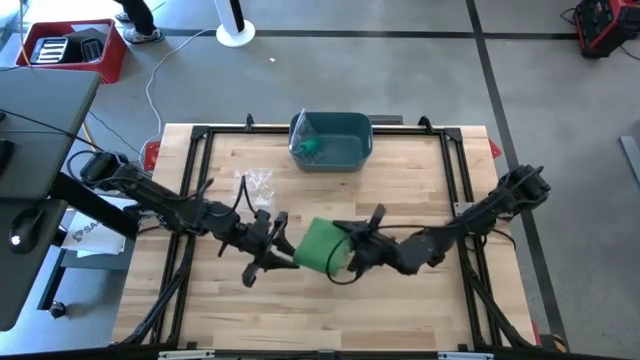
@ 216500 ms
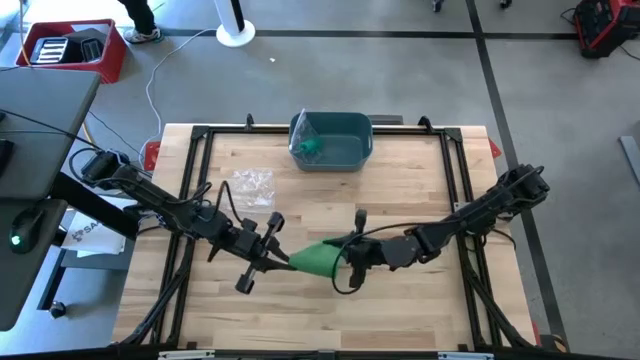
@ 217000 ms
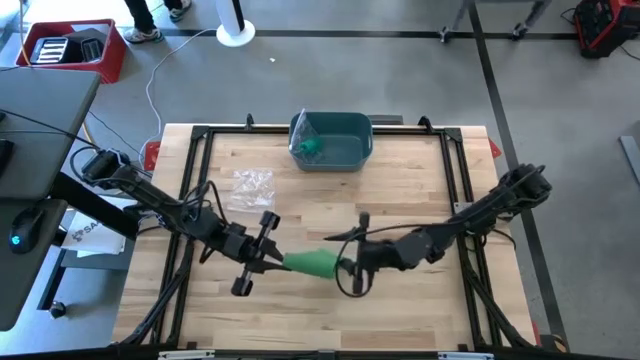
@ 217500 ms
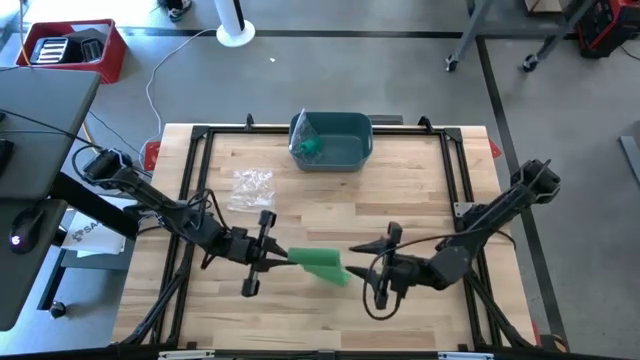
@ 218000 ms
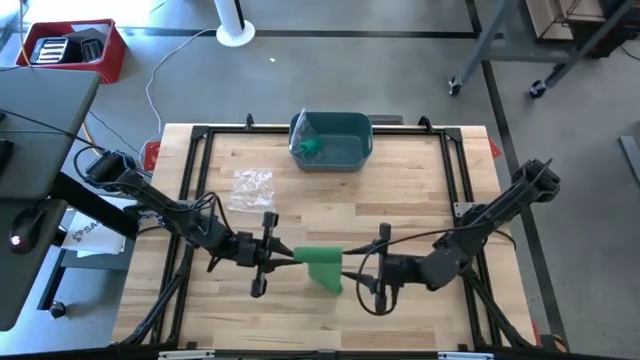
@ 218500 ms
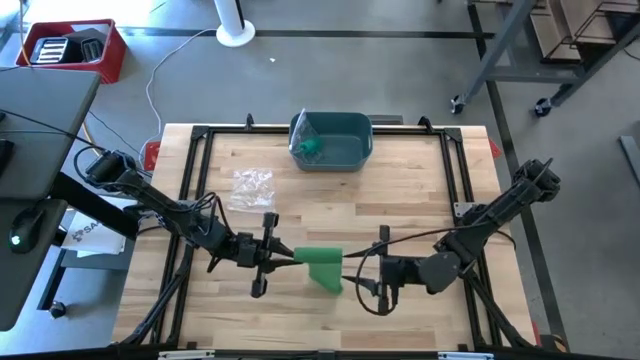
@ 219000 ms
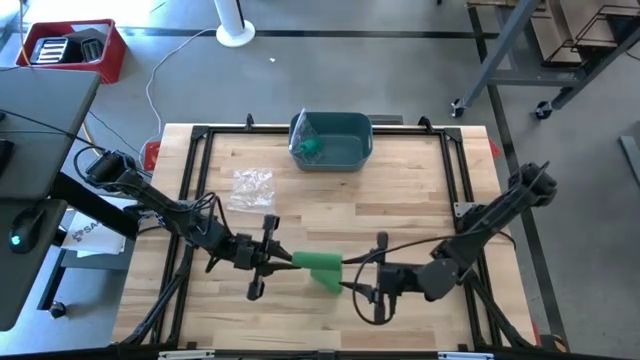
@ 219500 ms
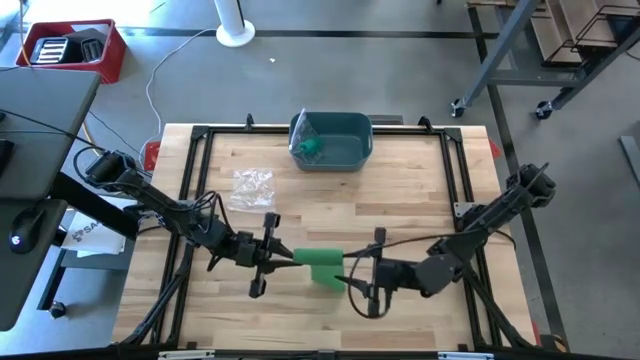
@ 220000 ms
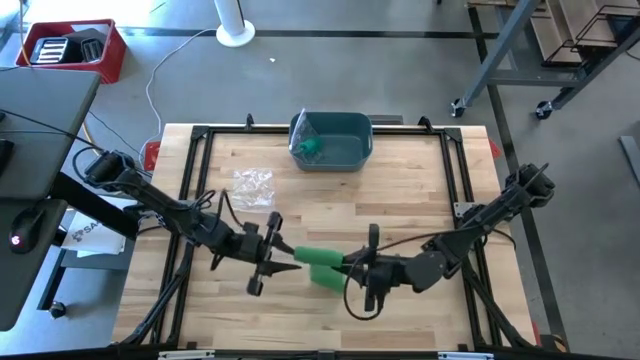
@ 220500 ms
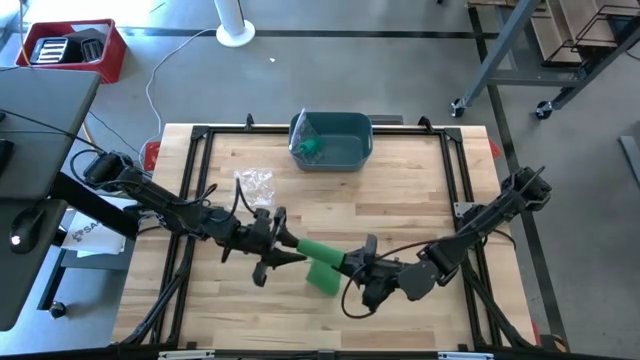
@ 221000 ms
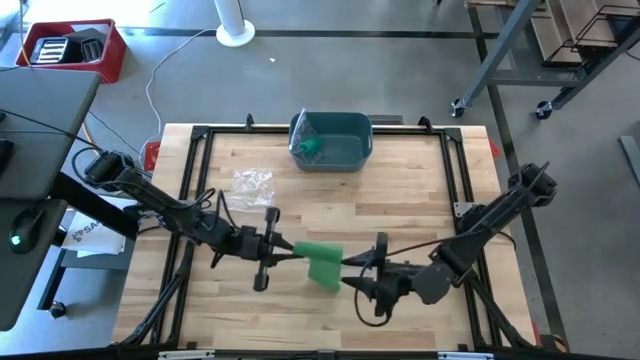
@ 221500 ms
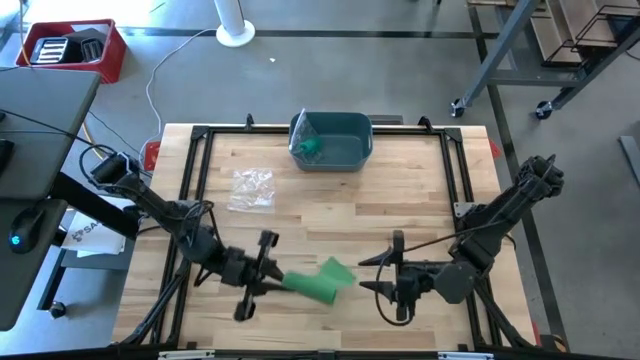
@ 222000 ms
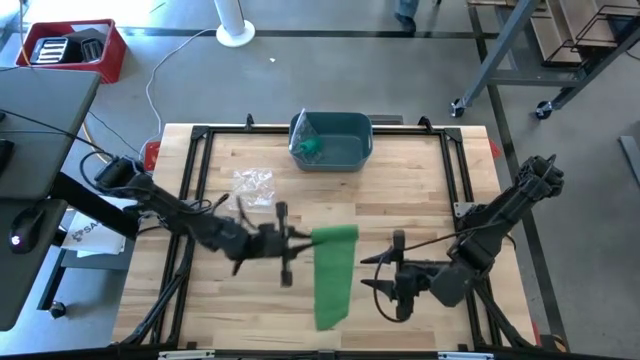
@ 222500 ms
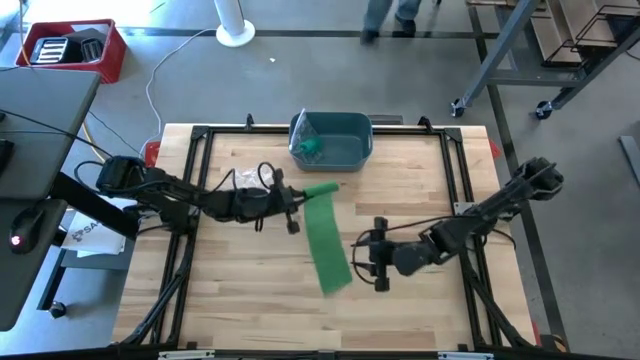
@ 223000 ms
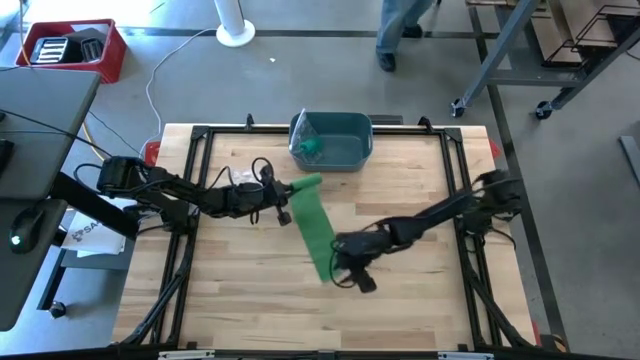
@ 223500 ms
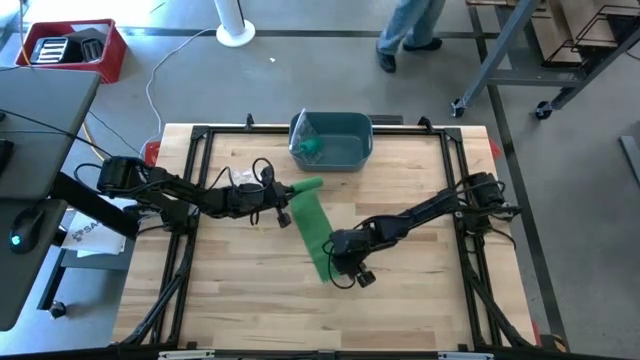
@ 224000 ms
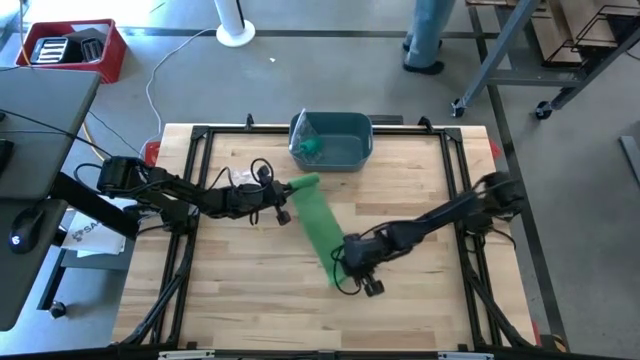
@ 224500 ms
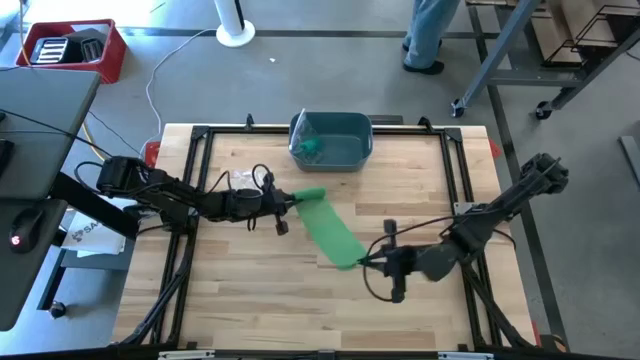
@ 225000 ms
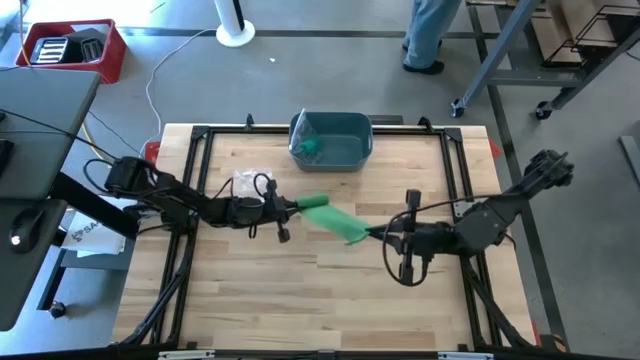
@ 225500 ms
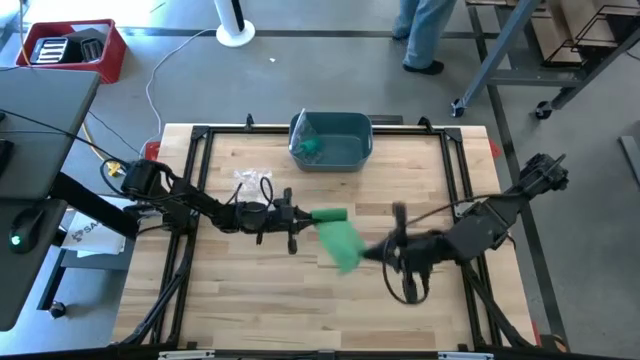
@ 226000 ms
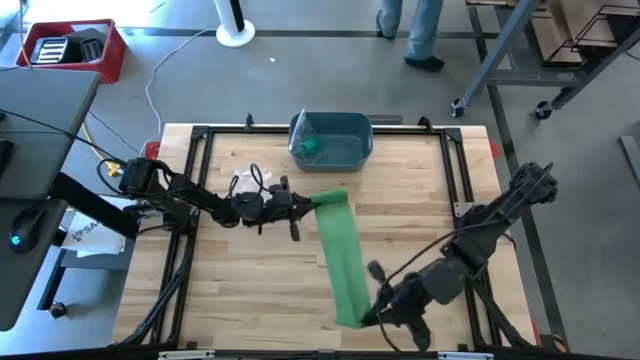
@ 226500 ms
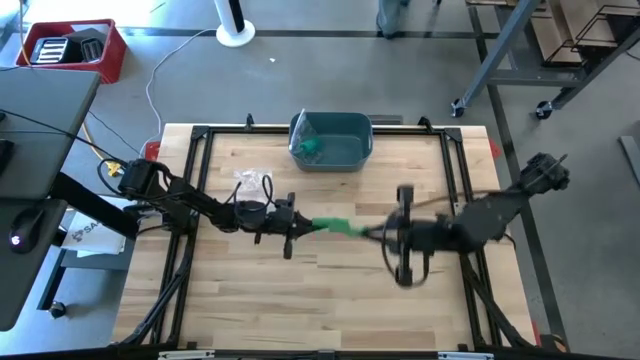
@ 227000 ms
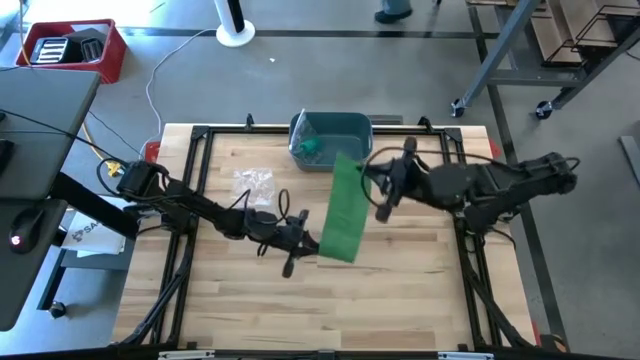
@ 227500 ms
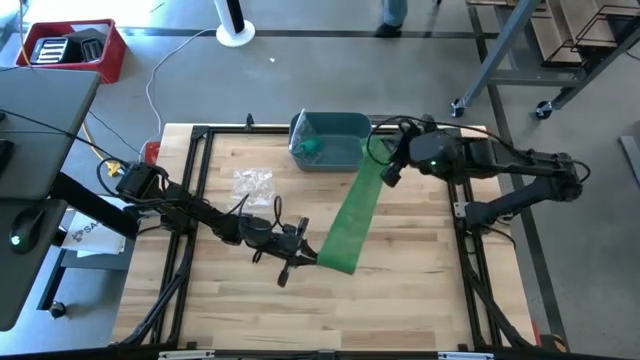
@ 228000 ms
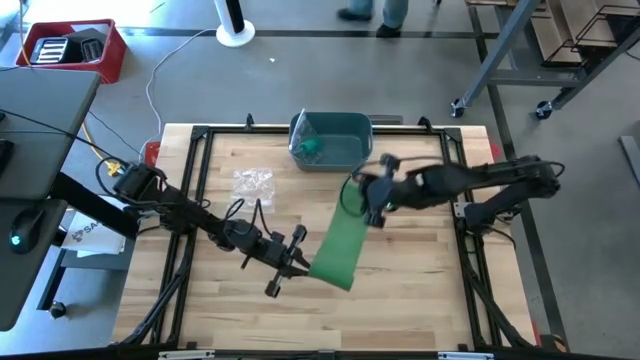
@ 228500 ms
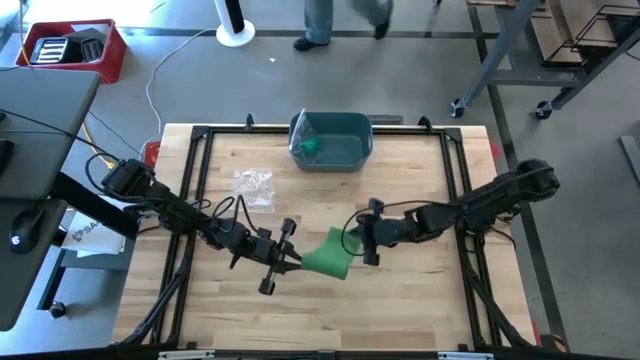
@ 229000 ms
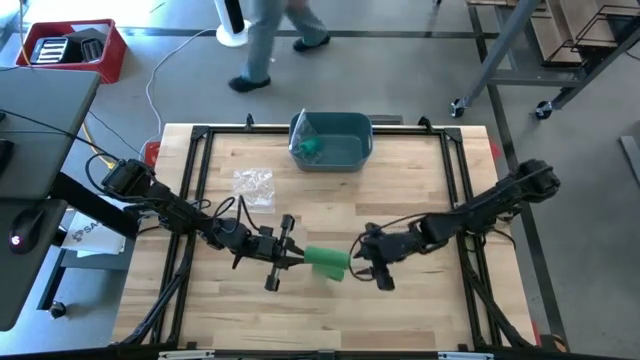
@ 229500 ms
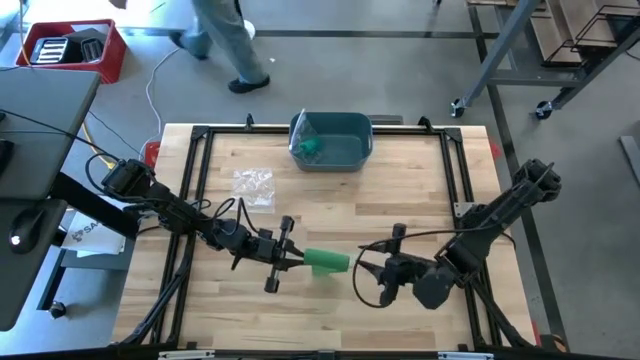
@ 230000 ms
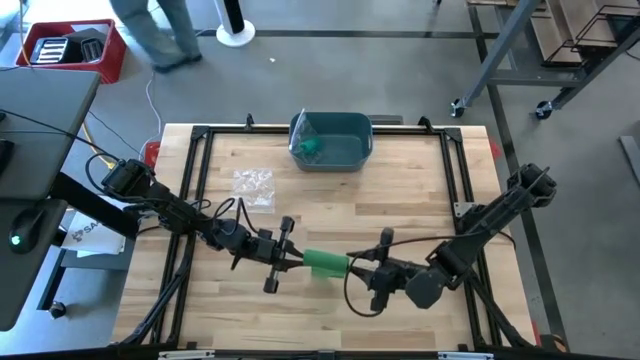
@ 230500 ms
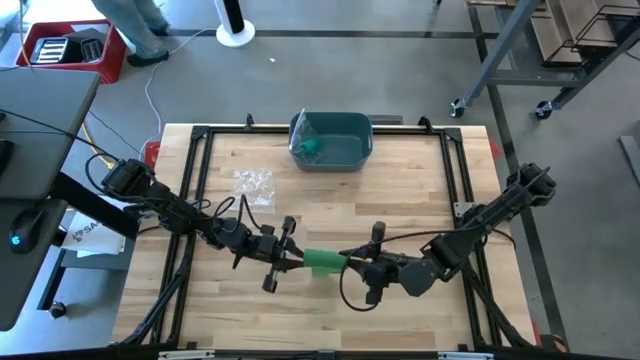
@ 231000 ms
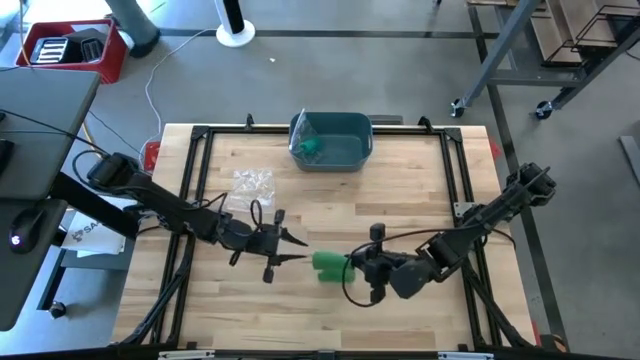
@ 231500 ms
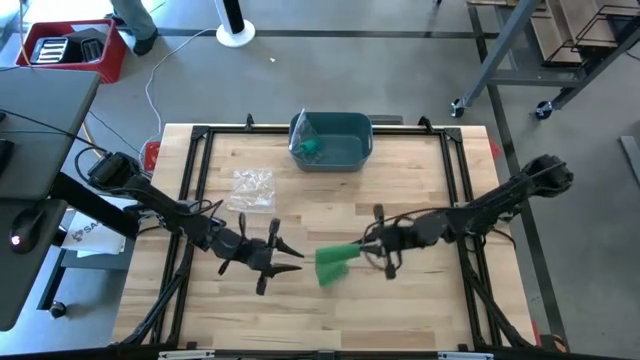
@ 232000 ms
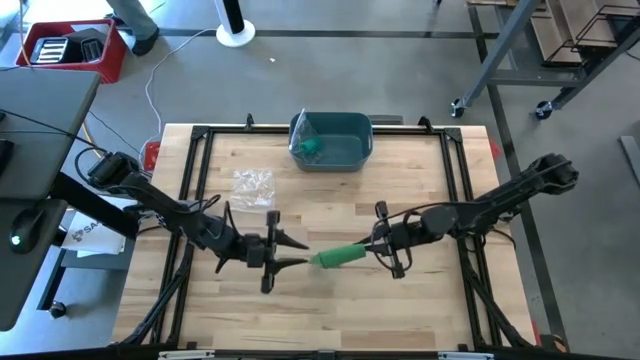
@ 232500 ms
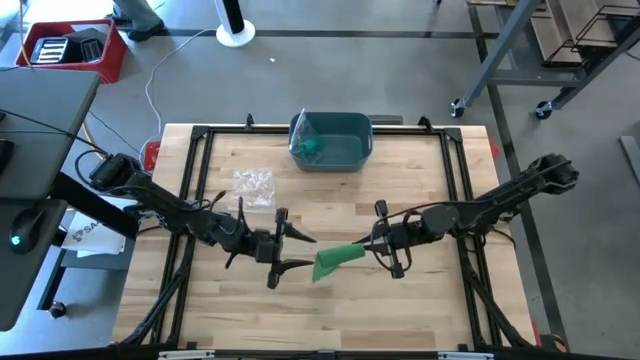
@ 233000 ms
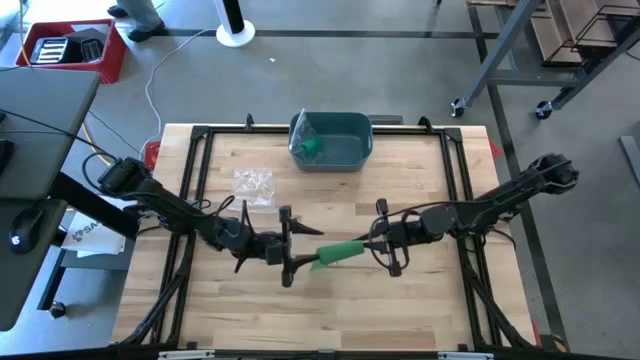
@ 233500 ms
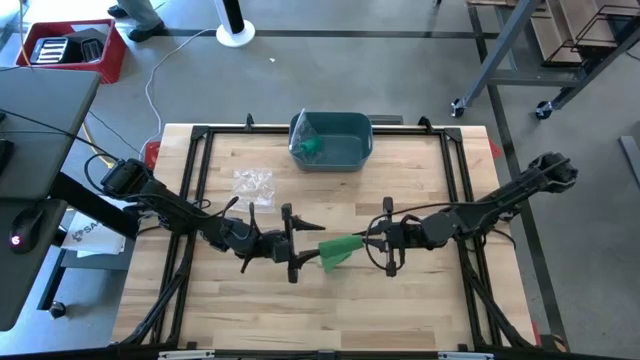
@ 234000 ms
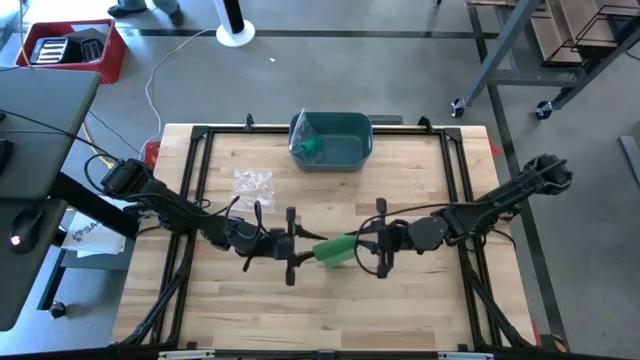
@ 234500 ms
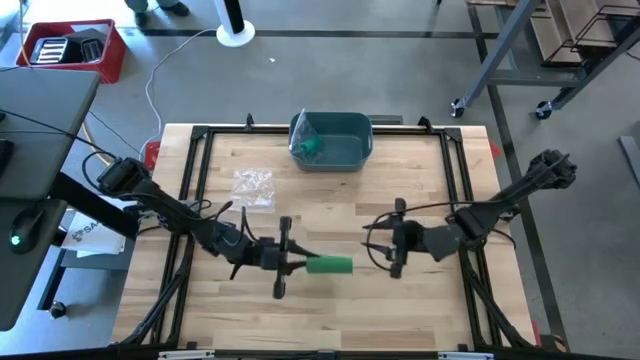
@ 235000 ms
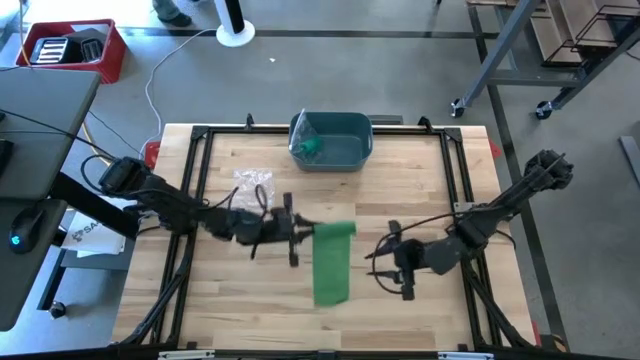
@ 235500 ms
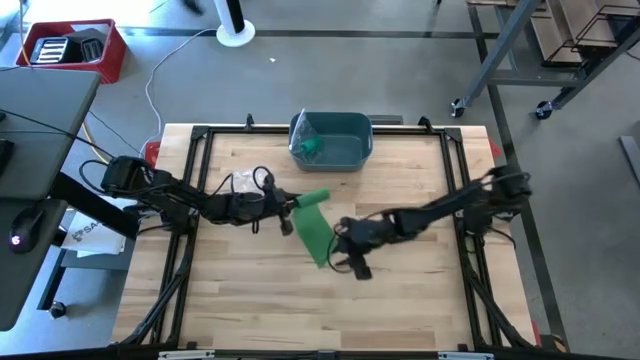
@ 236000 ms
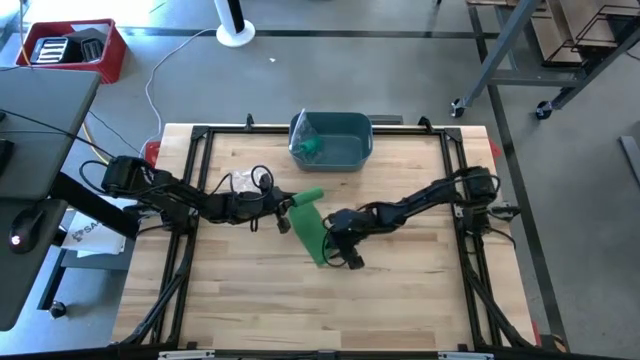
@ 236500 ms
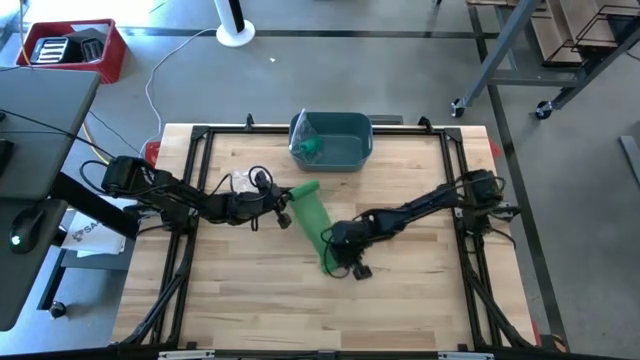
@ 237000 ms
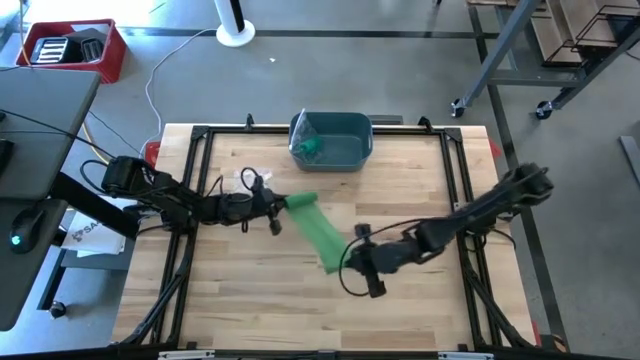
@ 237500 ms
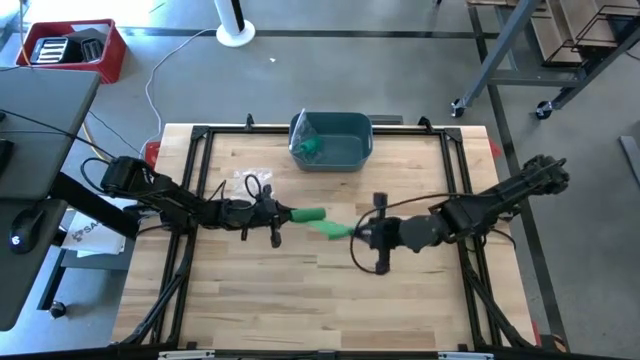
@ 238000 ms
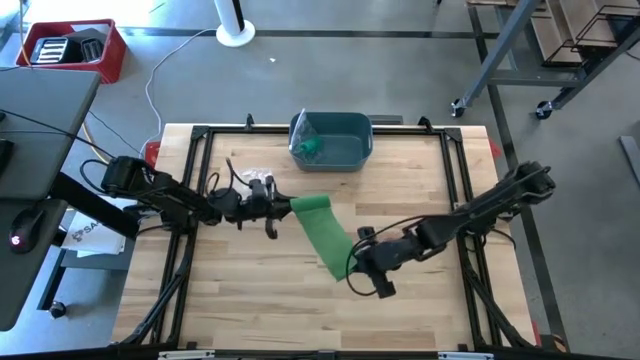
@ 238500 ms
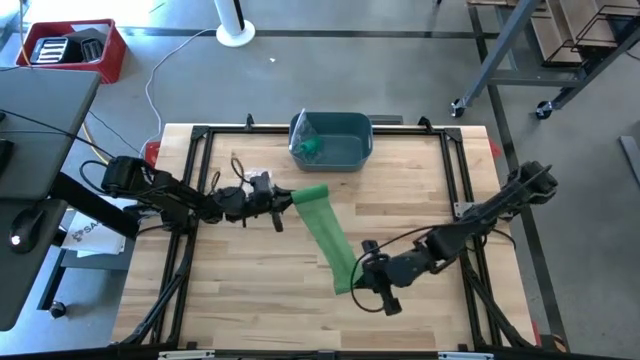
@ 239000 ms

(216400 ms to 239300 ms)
Task: Roll bandage
Roll the green bandage
